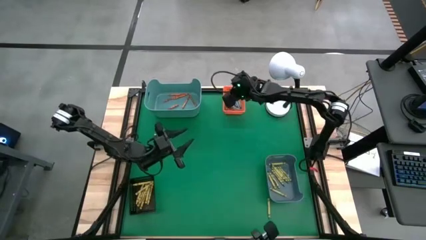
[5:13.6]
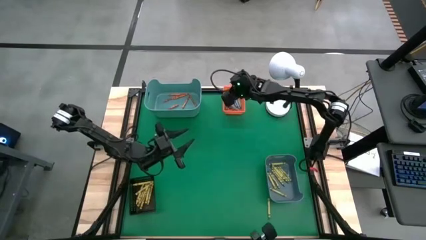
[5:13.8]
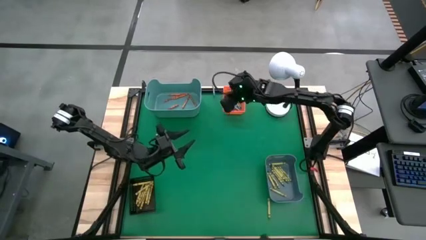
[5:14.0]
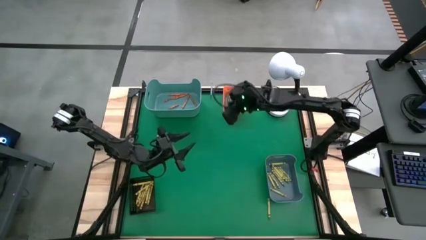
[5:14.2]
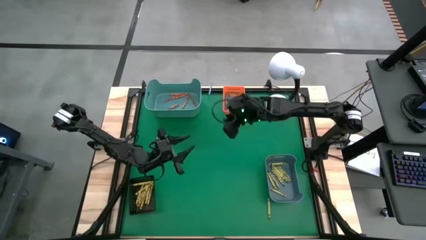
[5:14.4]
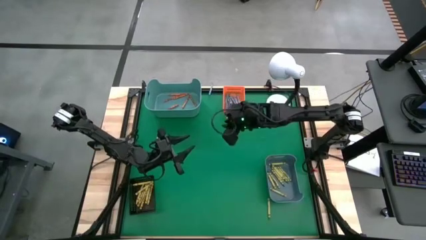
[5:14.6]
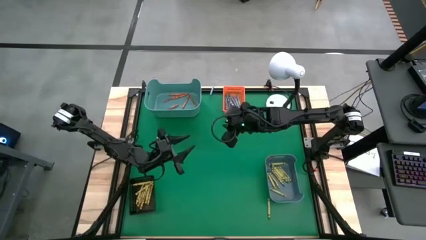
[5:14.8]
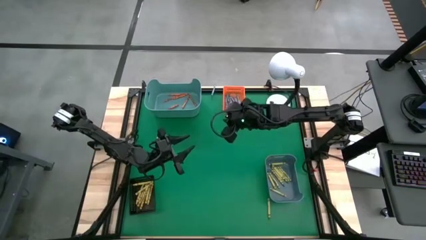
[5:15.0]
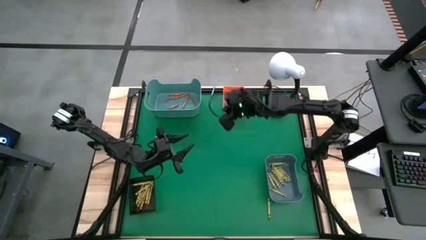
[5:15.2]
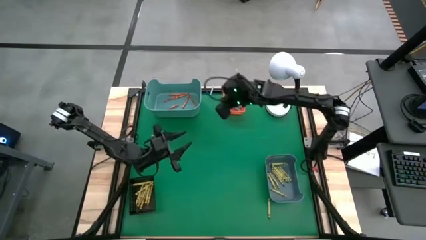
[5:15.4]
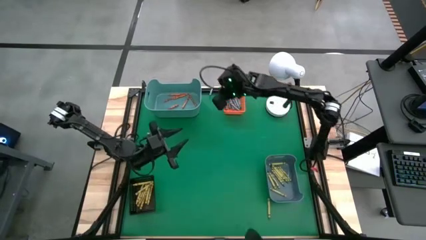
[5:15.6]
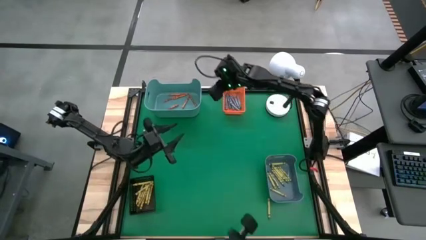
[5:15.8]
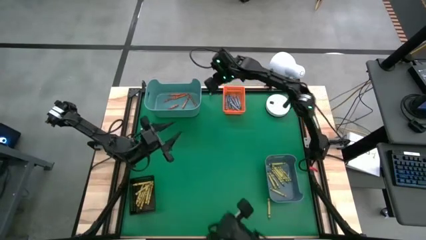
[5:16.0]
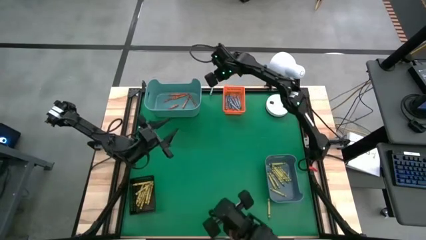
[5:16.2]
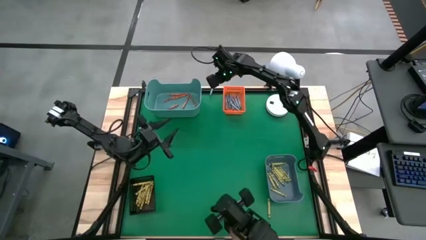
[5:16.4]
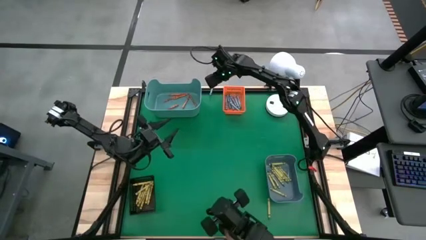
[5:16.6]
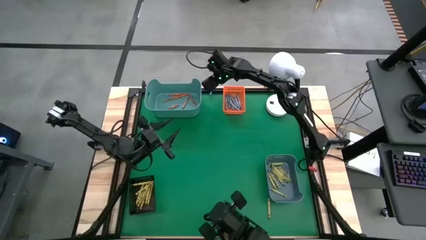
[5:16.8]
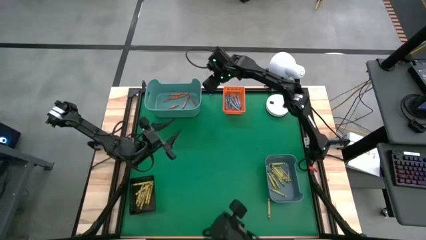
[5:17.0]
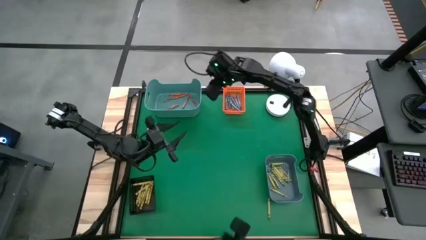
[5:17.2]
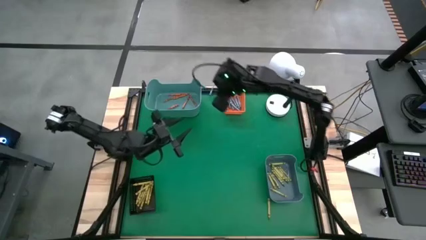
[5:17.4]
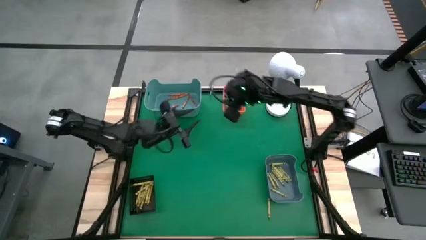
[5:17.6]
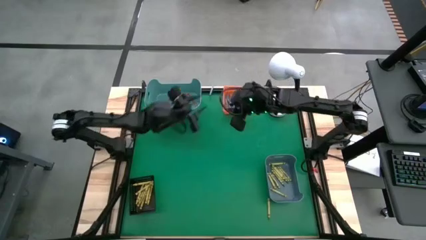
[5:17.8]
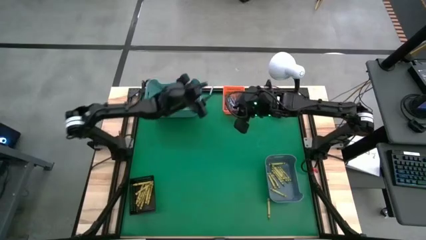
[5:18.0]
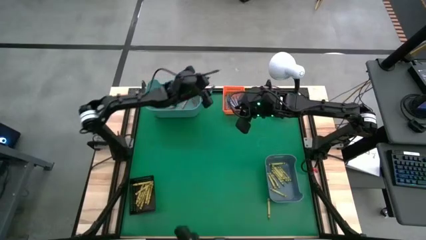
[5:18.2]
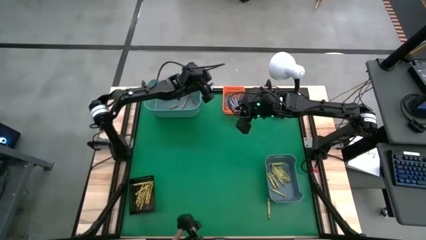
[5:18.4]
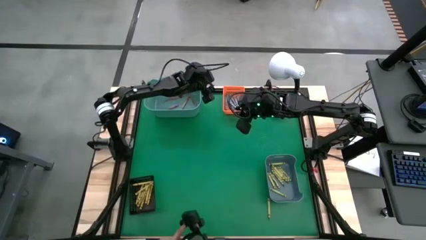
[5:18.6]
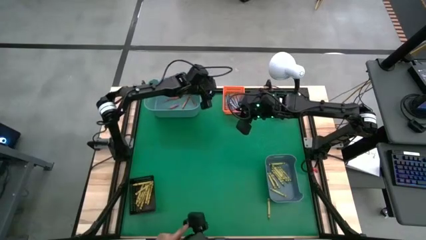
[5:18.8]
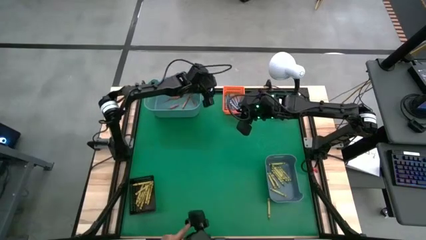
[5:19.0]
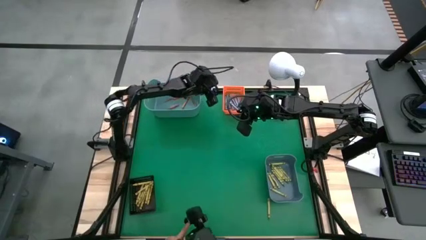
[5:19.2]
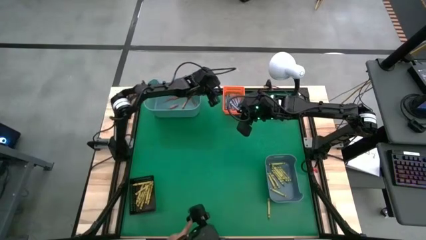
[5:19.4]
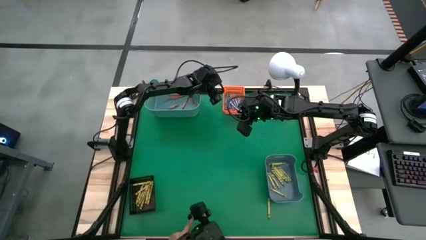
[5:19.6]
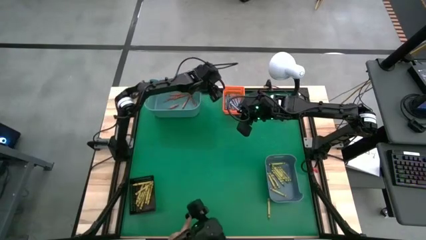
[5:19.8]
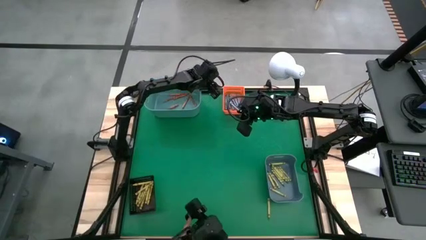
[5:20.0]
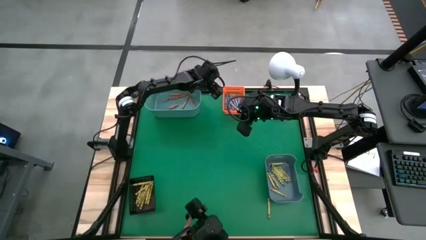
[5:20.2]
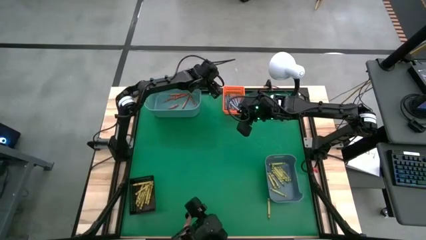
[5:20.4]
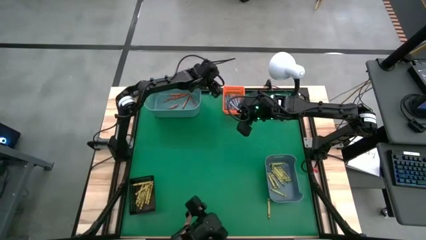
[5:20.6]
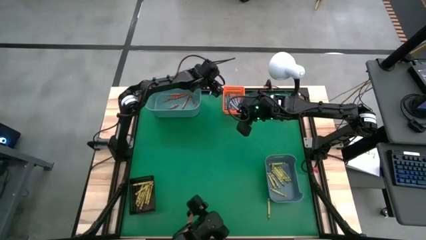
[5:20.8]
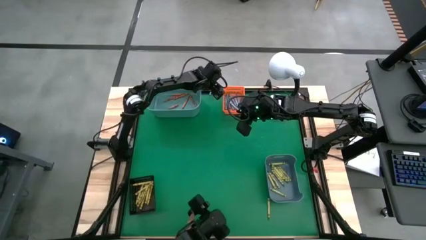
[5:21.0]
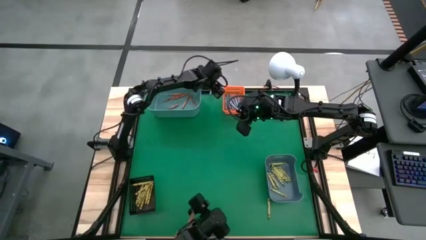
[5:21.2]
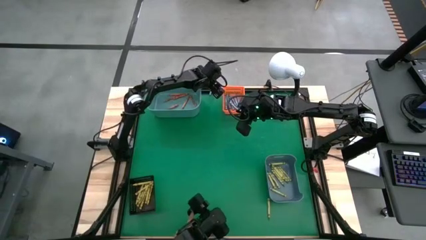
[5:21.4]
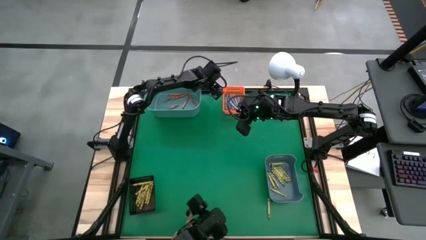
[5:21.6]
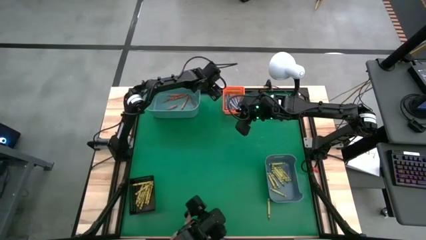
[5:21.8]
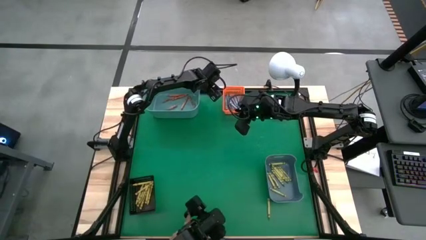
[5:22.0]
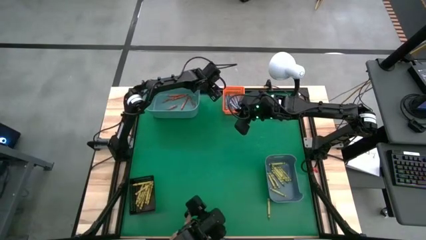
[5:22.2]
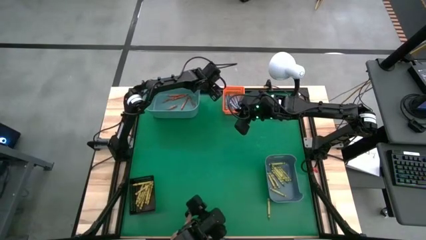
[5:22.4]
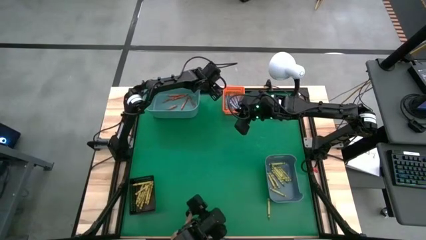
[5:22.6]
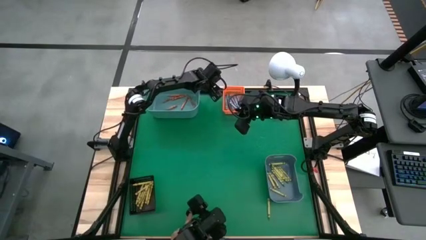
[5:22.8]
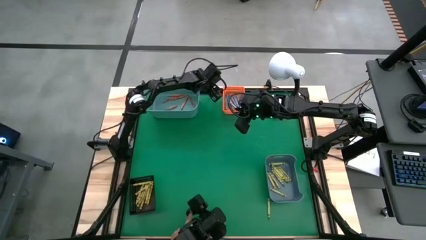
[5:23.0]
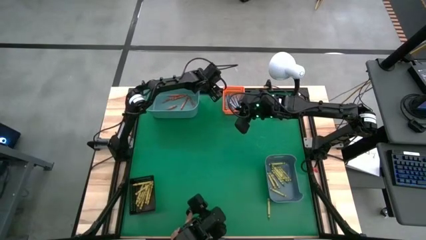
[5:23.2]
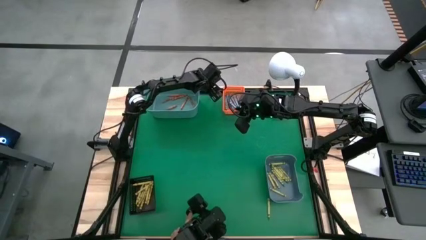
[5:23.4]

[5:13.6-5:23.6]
Task: Sort crayons
Put the blue crayon into the orange bin

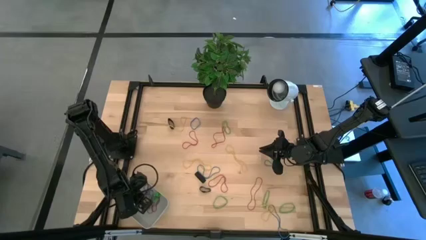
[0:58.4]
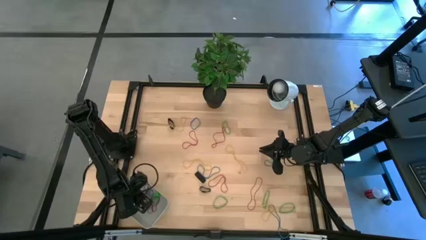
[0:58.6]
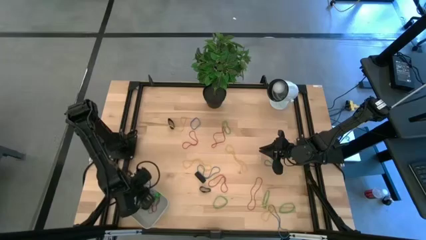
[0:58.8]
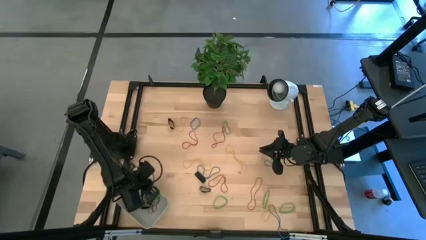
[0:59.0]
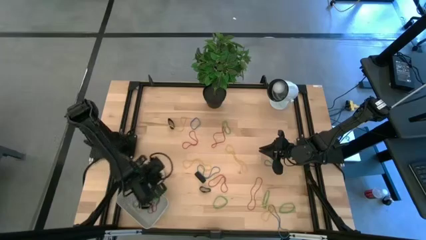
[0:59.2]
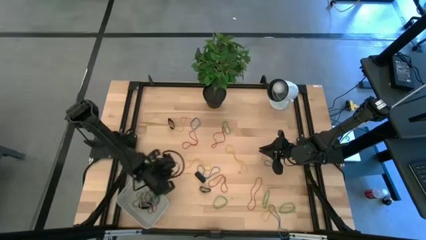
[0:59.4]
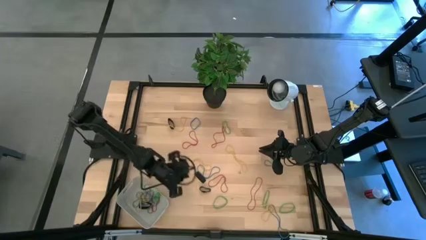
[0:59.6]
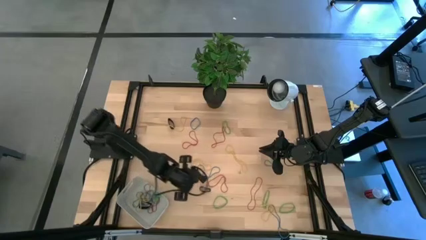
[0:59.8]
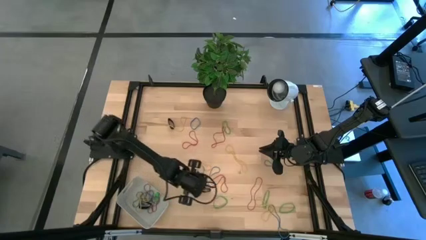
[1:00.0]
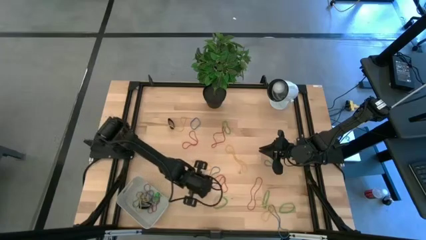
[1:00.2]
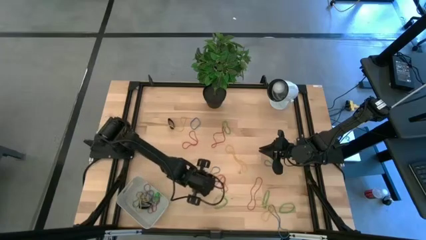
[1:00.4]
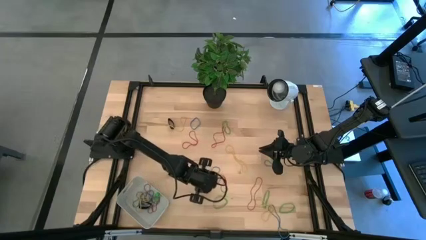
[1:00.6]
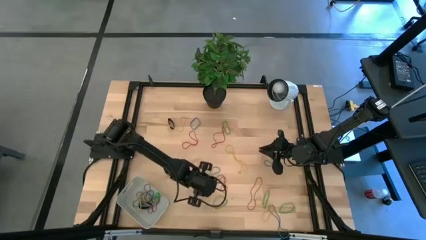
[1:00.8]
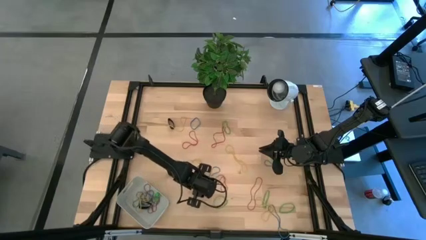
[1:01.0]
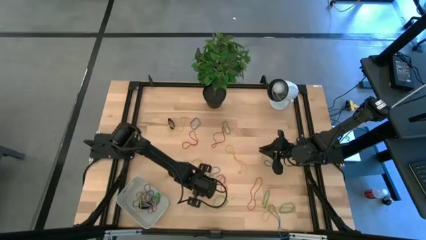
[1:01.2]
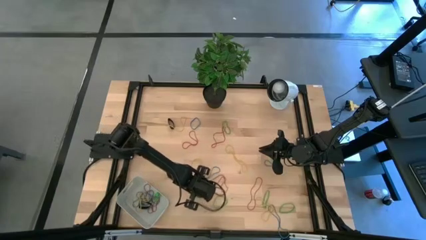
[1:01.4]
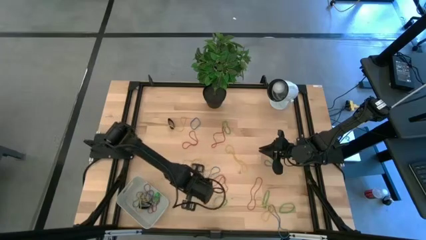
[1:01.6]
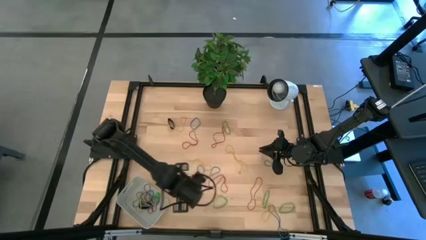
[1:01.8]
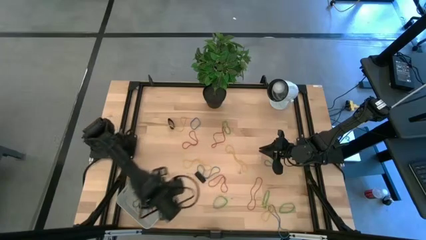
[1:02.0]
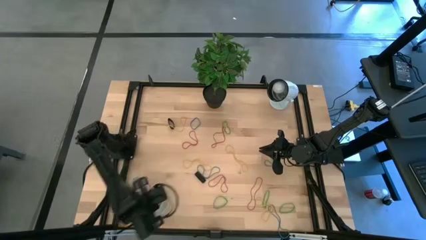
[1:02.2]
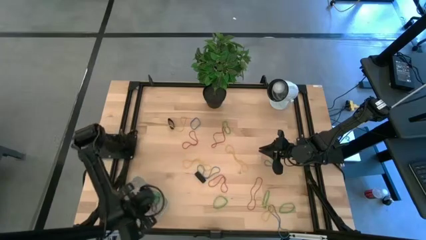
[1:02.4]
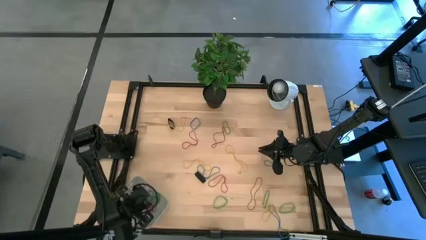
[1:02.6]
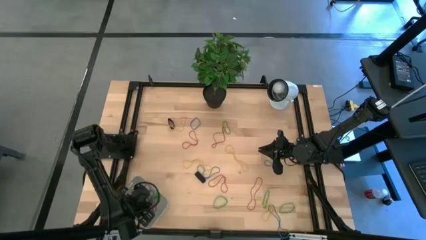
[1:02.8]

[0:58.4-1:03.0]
Task: Pick and place rubber bands into bin
Put the bottom black rubber band into the gray bin

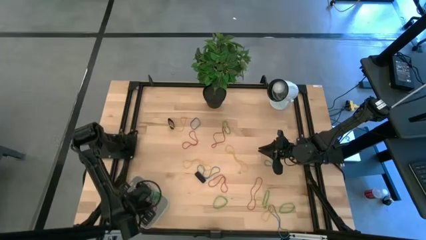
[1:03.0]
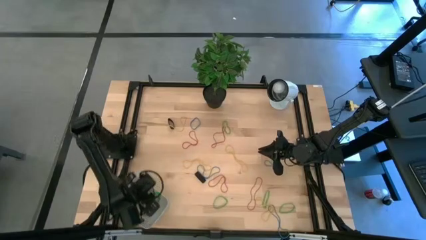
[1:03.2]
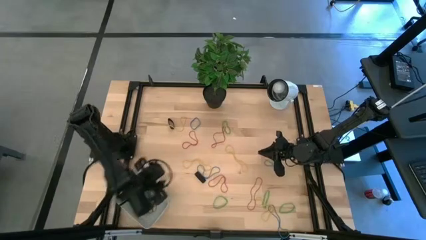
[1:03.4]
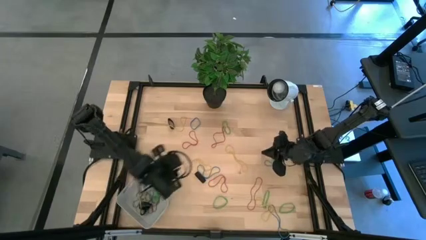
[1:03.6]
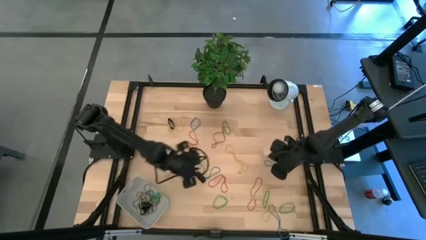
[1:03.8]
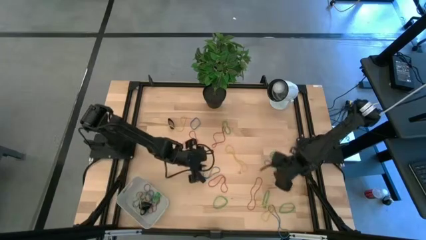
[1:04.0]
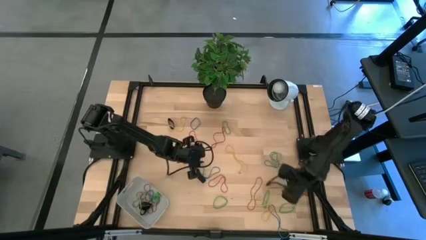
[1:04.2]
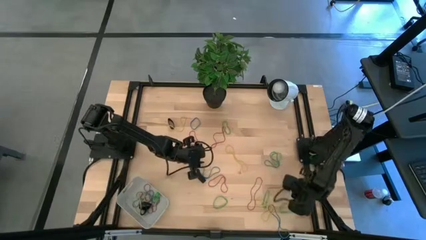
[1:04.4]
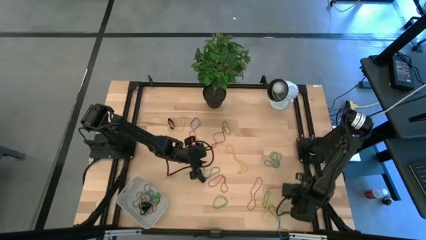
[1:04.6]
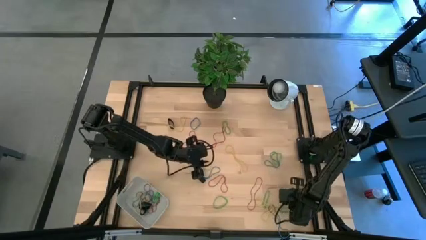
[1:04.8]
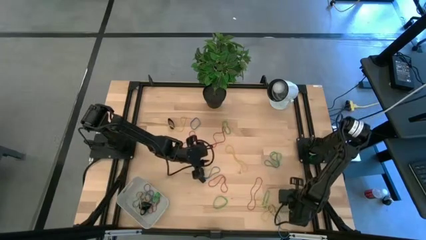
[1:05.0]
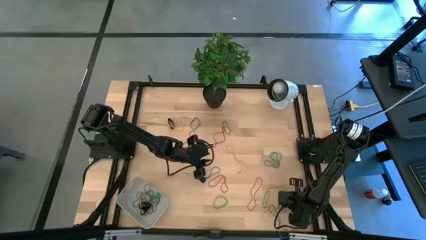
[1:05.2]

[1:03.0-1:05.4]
Put the green rubber band into the gray bin
